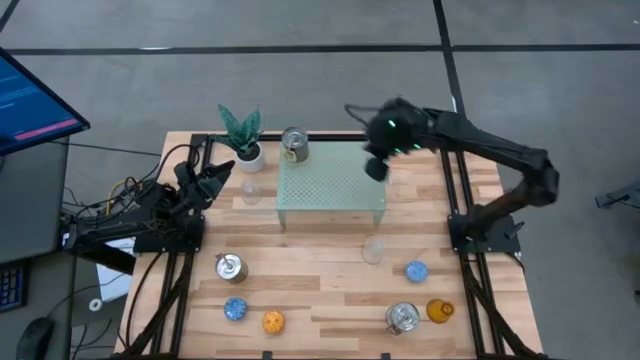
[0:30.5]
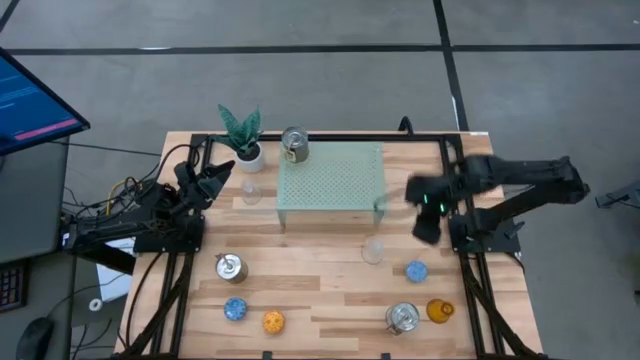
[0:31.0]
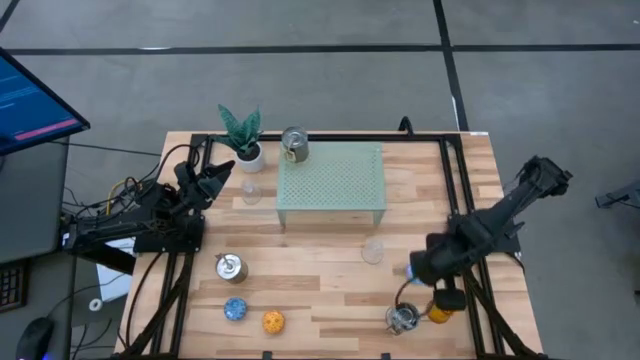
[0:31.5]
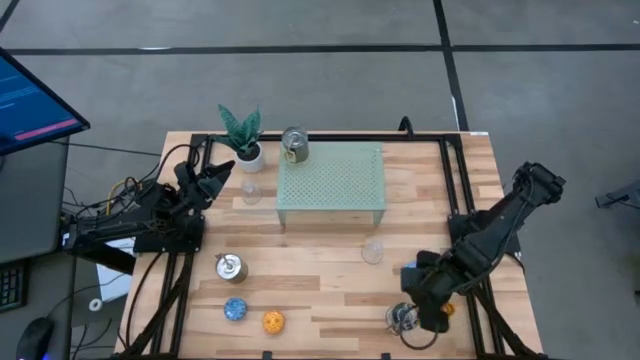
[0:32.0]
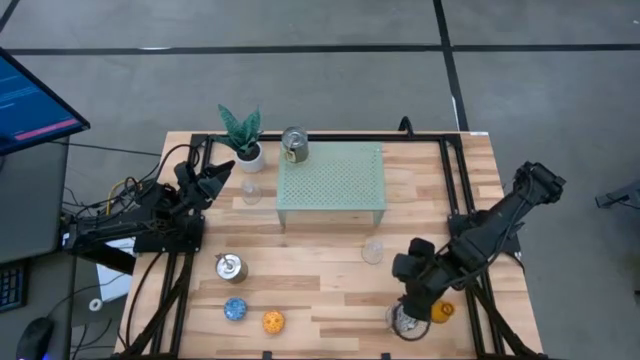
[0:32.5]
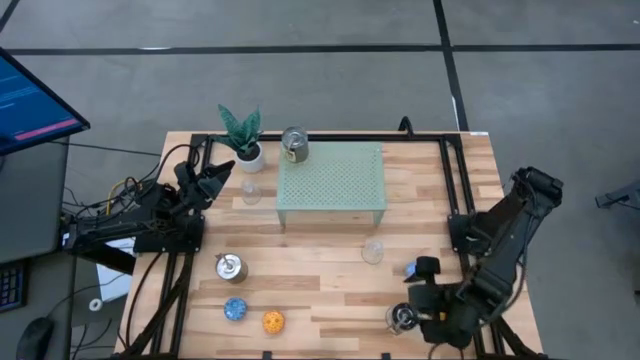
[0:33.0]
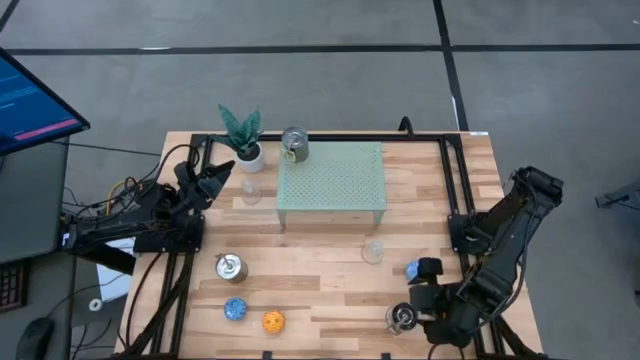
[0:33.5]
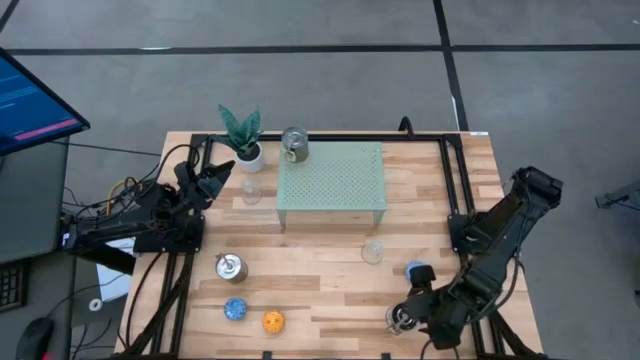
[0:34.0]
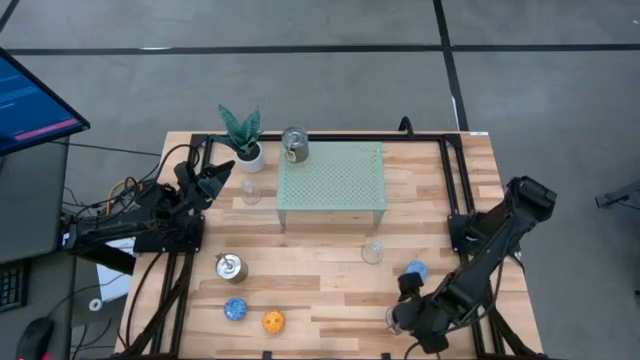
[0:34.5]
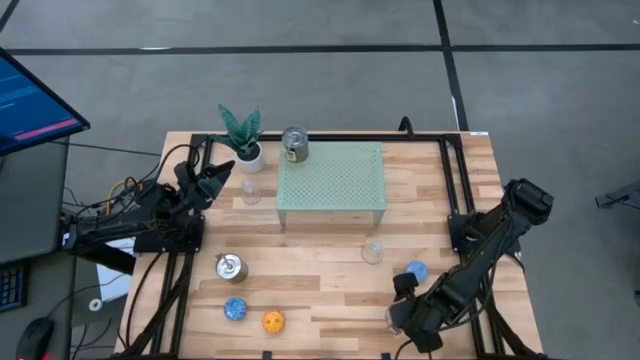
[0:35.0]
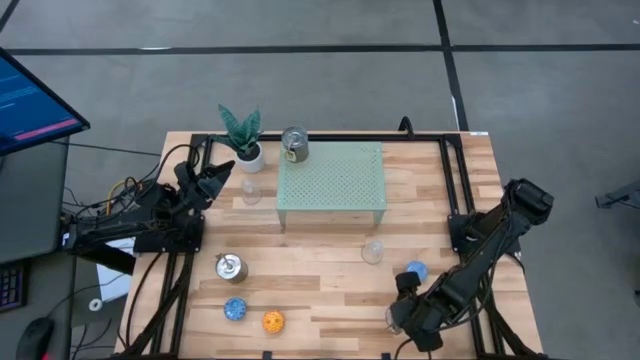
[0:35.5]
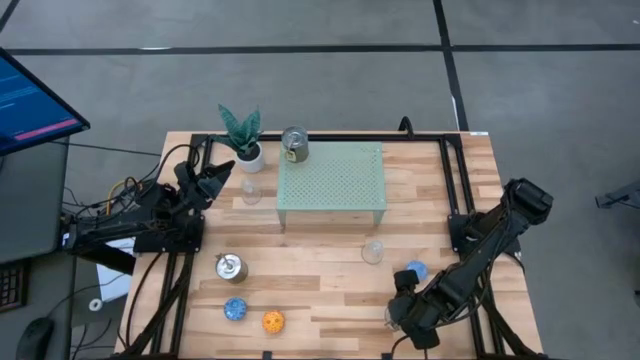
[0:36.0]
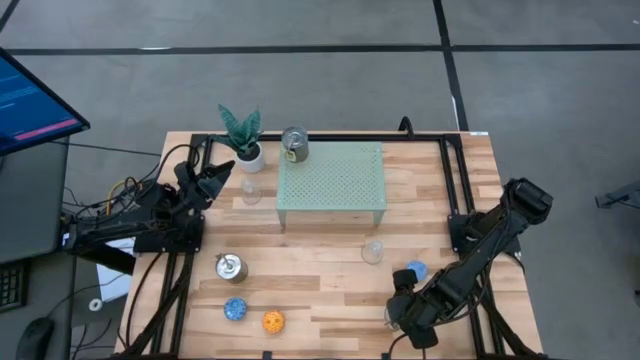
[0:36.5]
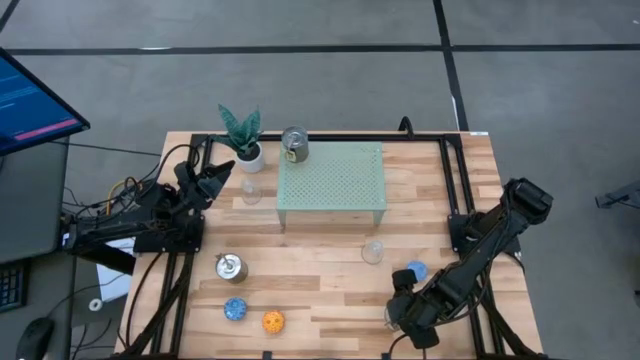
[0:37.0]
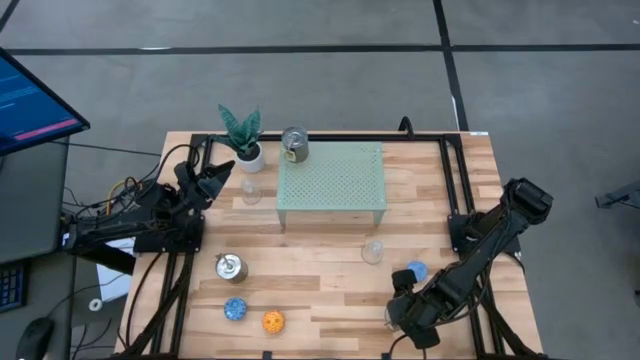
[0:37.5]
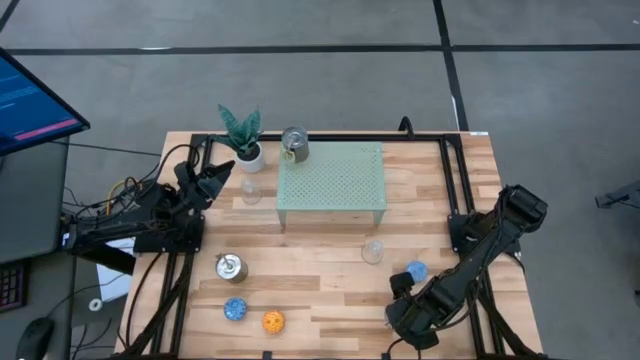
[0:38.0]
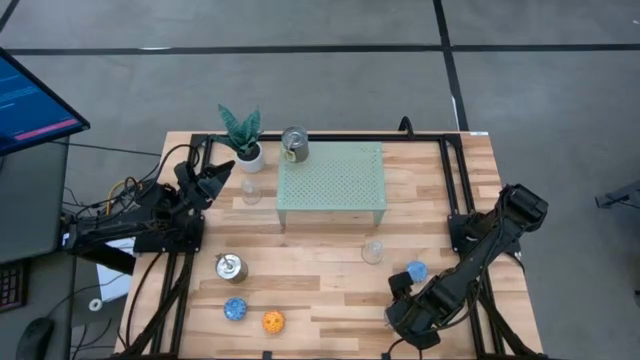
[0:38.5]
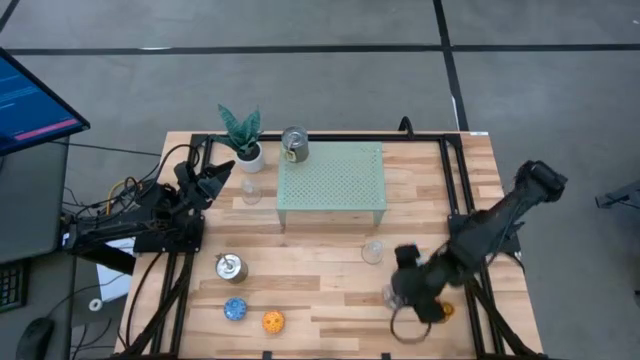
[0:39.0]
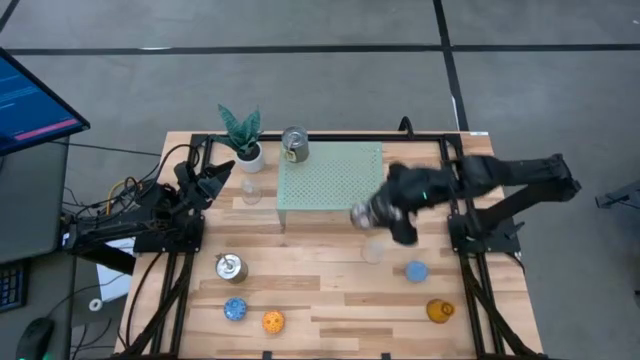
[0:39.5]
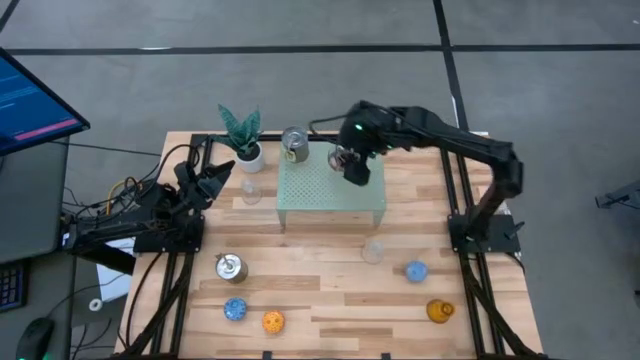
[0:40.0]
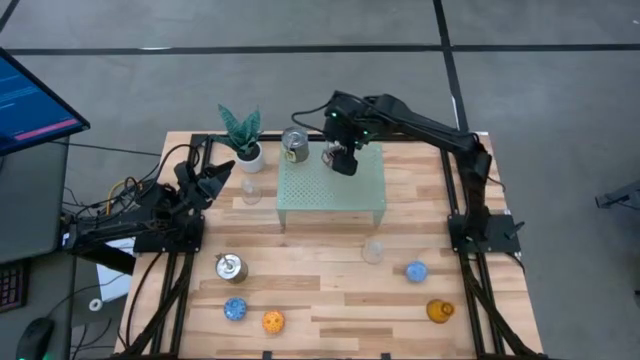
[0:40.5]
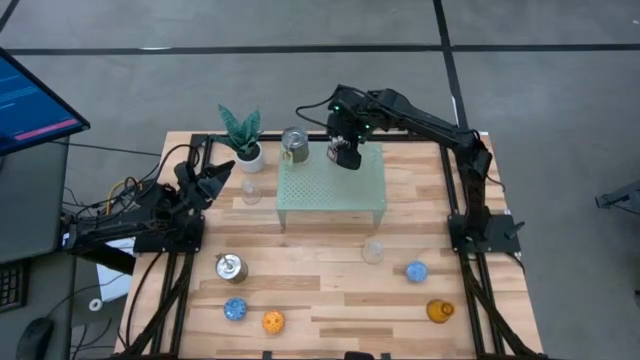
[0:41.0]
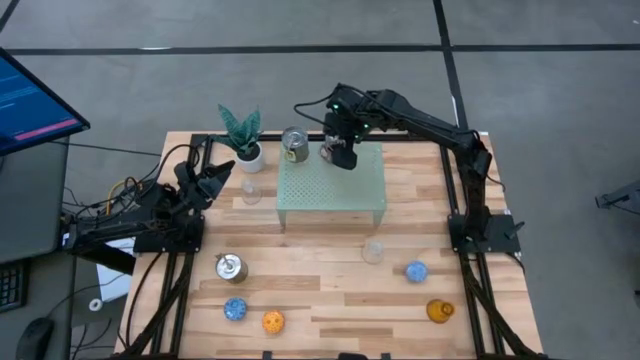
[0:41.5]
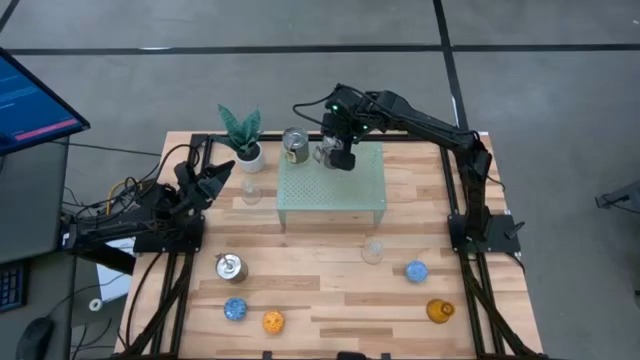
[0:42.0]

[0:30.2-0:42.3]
Task: Pick & Place candle stick holders
Put the bottom silver scented candle can on the shelf

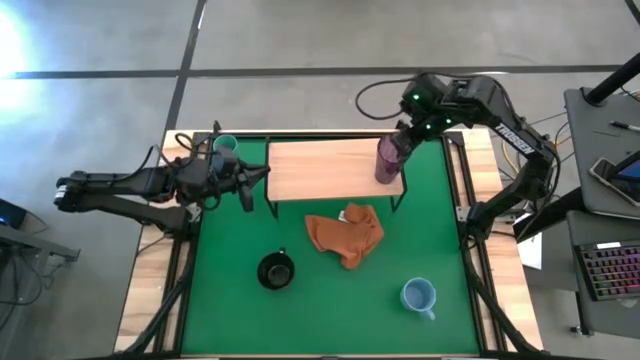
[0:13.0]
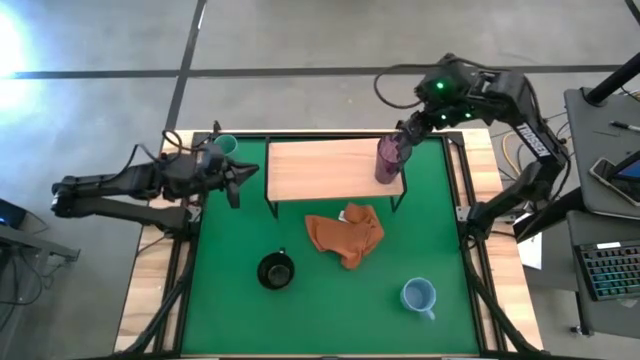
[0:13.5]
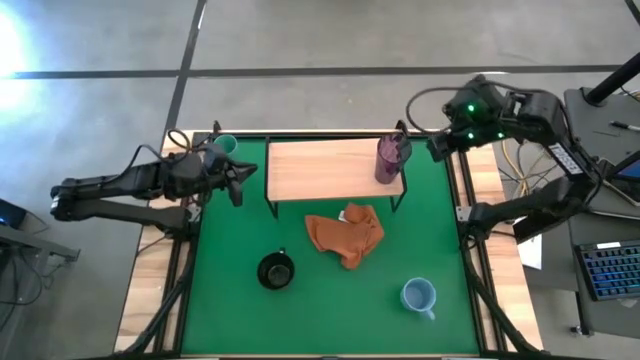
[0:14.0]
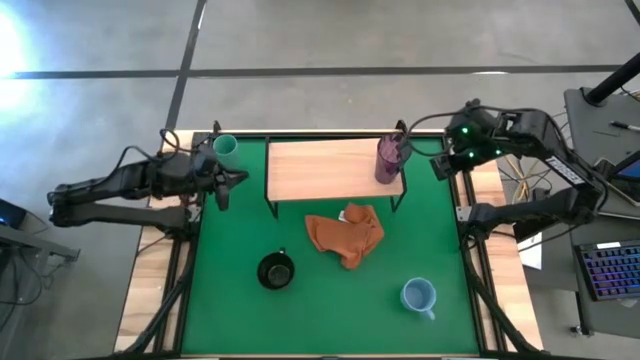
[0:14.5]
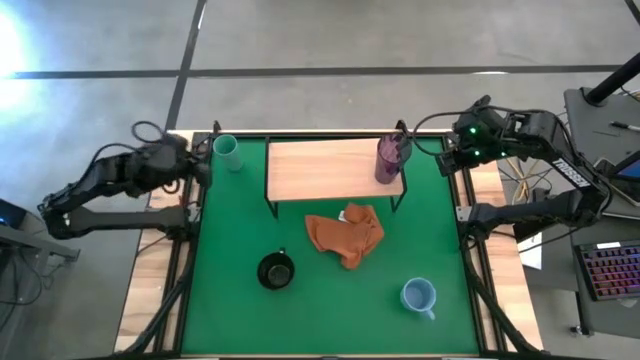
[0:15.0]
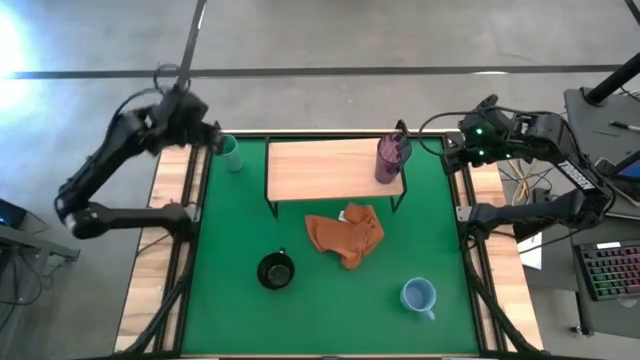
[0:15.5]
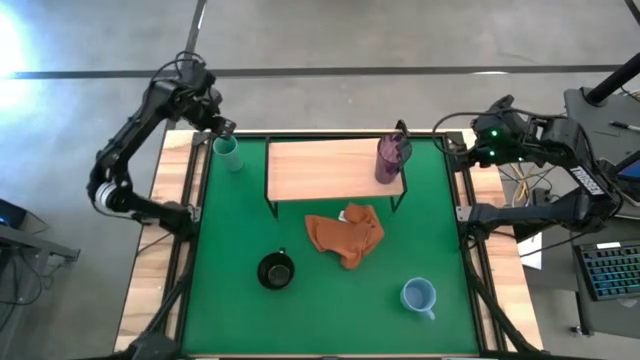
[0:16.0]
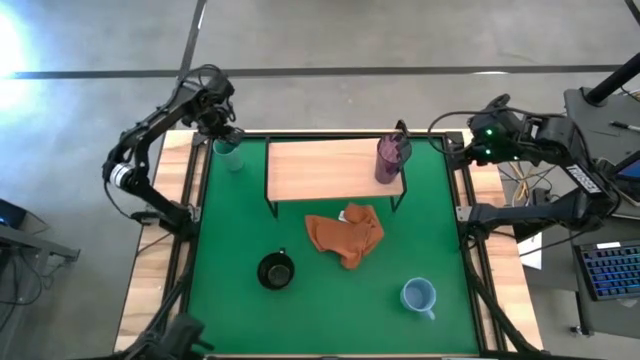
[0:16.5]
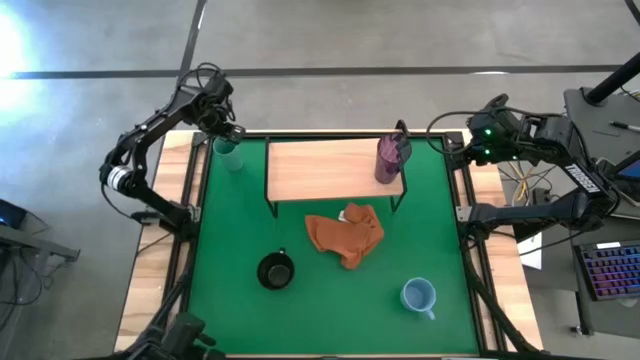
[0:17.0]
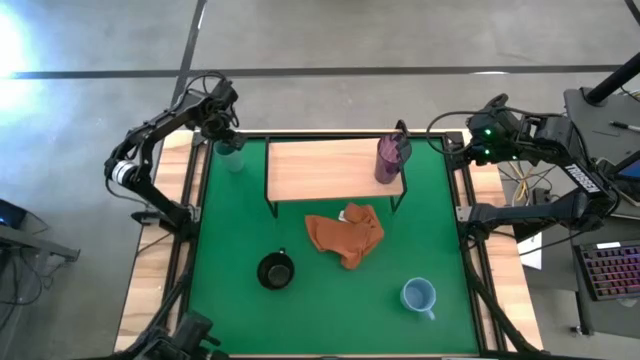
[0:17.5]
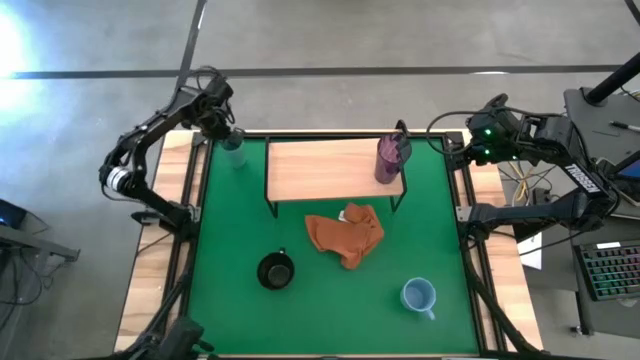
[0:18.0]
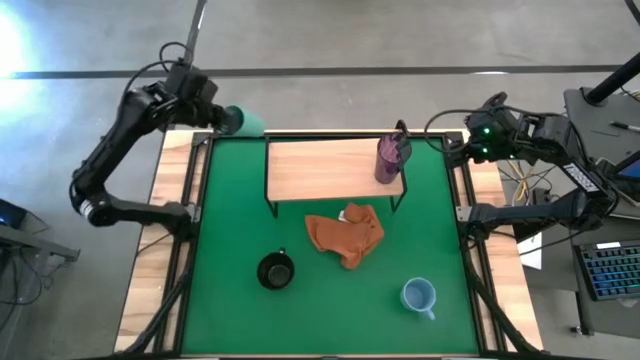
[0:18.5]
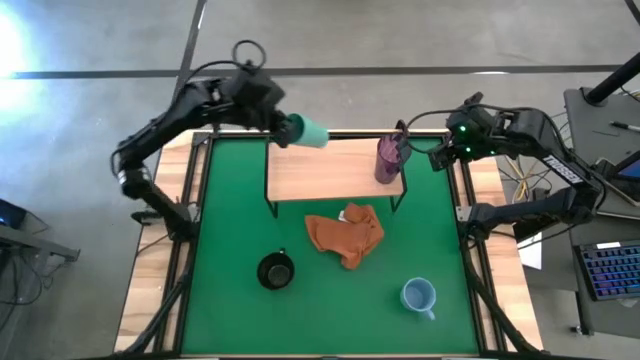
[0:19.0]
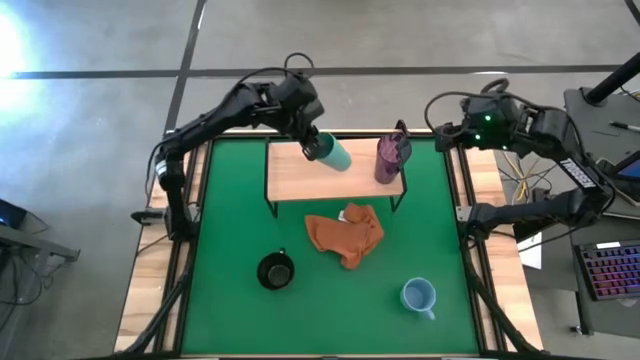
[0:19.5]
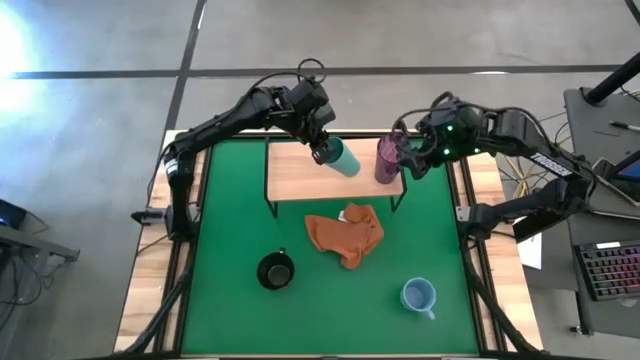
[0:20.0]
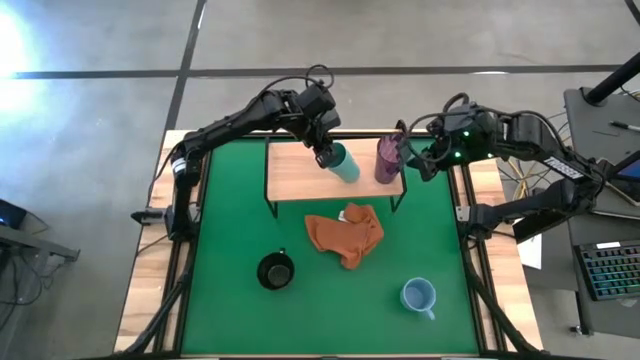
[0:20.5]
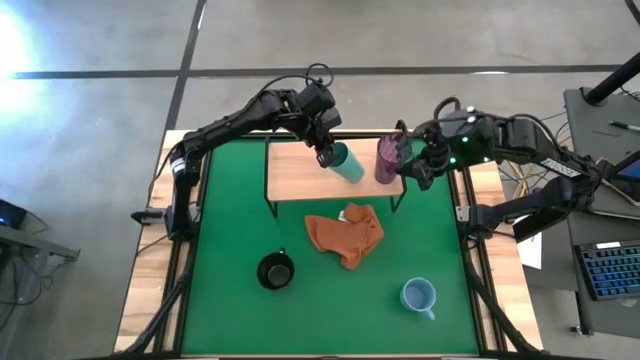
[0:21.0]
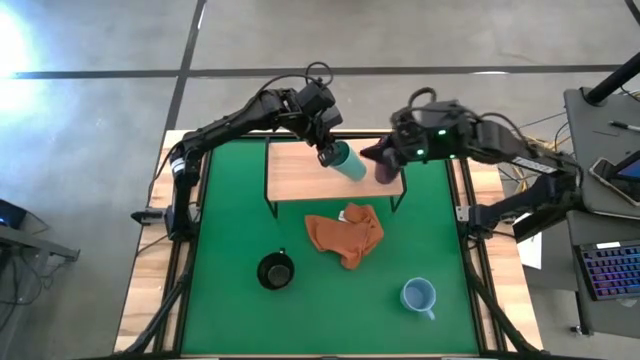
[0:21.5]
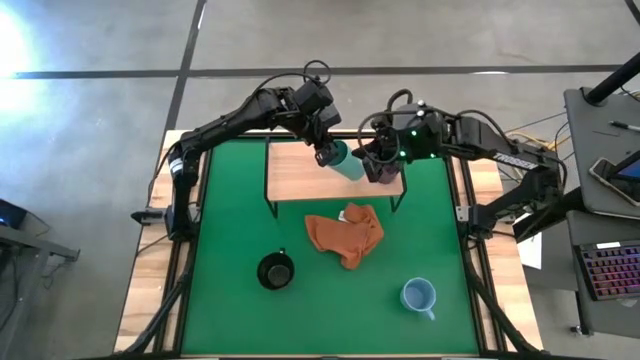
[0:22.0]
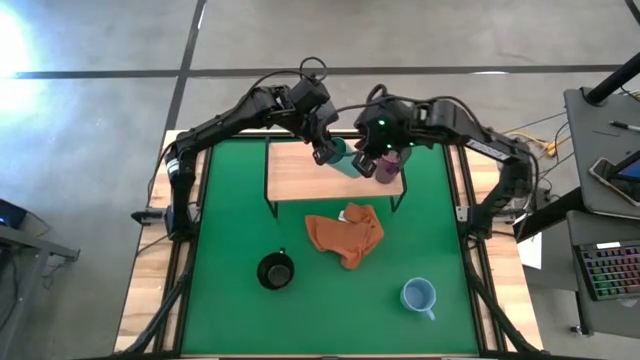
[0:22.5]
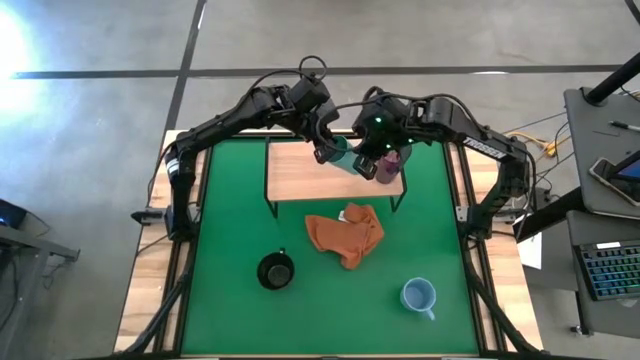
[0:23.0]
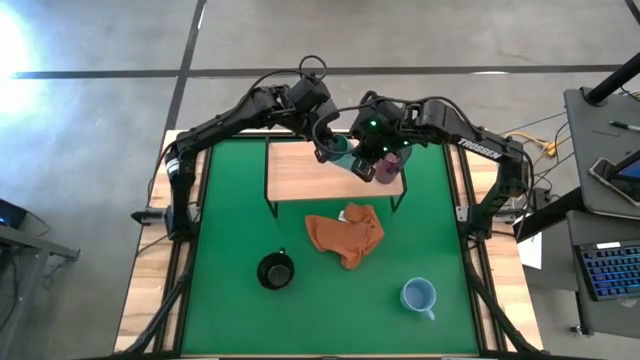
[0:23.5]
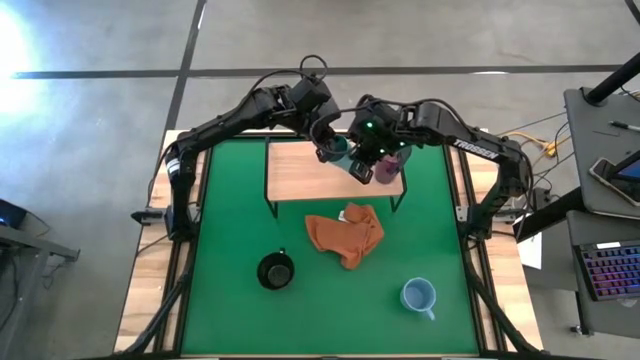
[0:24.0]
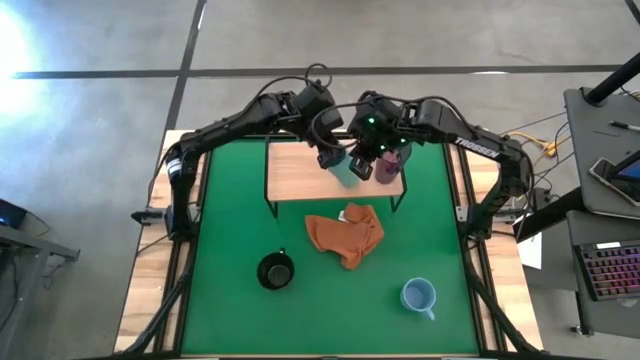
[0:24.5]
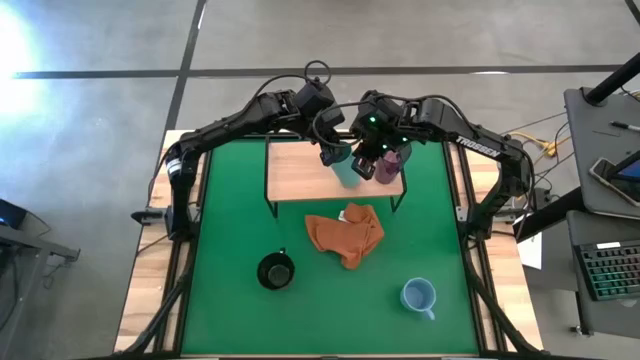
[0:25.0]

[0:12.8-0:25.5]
Task: Stack small to large cups/mugs on shelf
Put the green cup on the shelf
